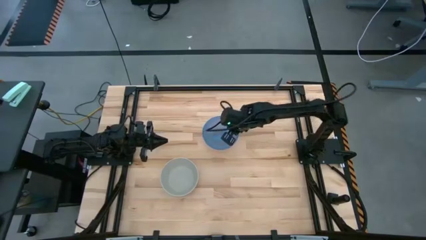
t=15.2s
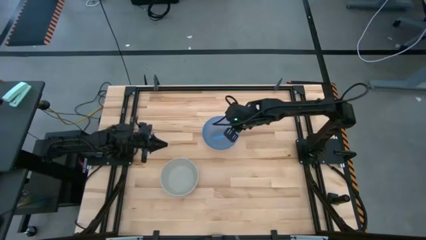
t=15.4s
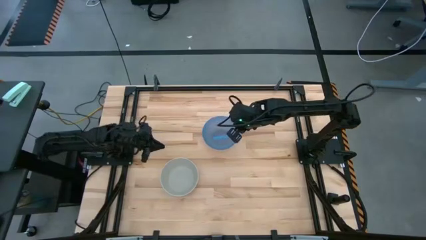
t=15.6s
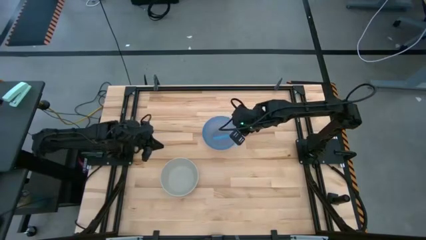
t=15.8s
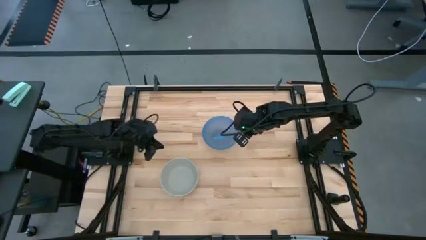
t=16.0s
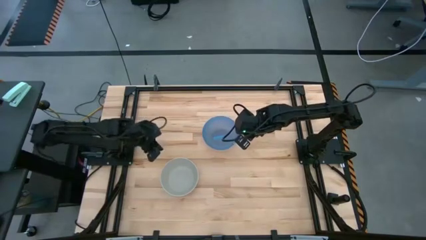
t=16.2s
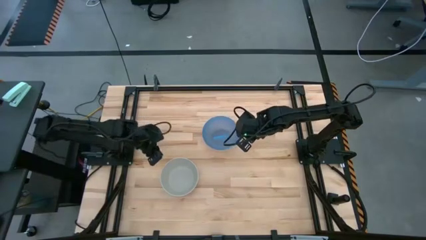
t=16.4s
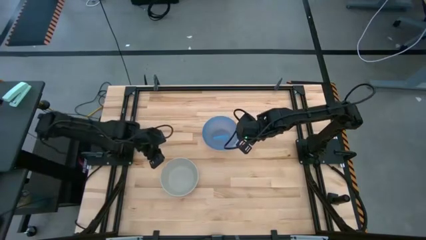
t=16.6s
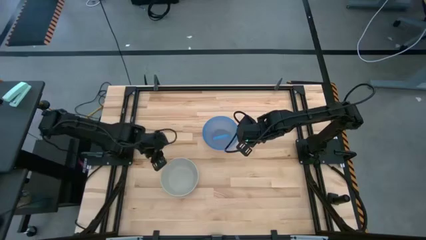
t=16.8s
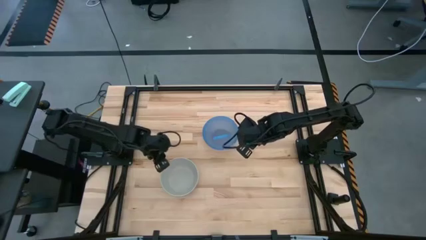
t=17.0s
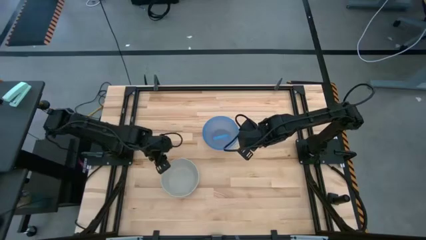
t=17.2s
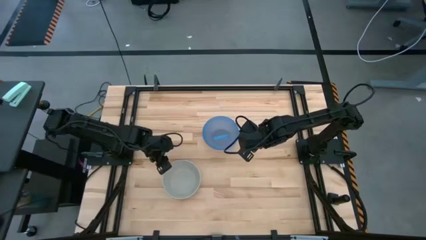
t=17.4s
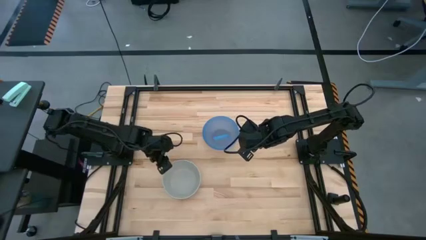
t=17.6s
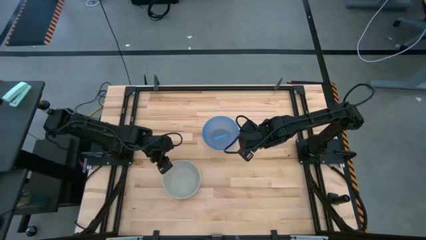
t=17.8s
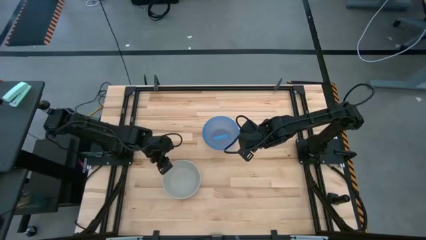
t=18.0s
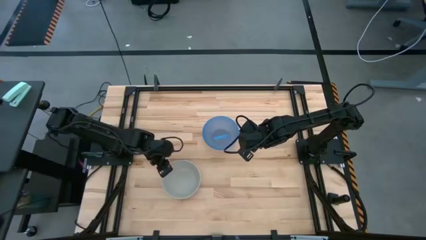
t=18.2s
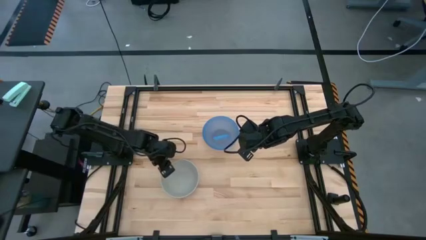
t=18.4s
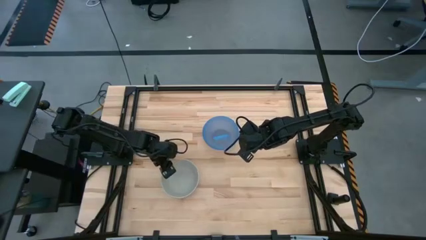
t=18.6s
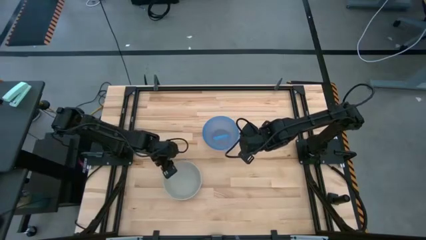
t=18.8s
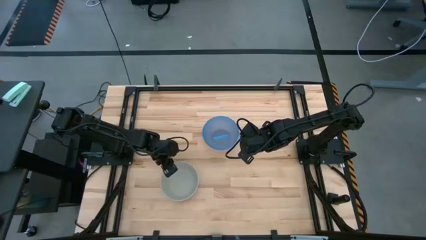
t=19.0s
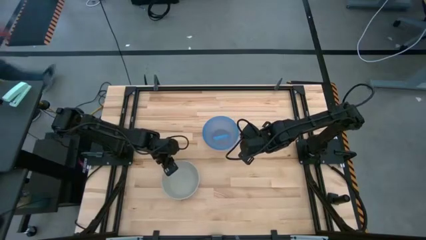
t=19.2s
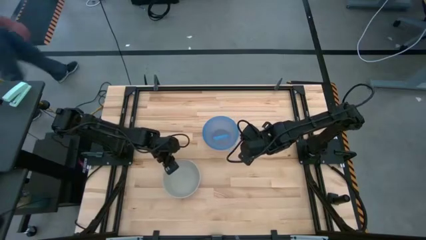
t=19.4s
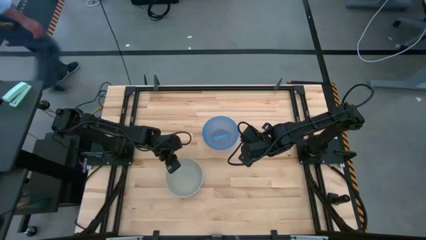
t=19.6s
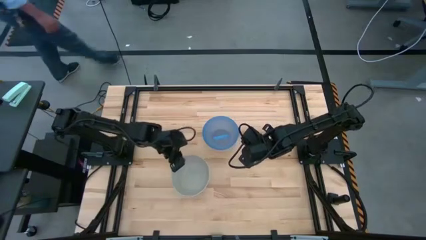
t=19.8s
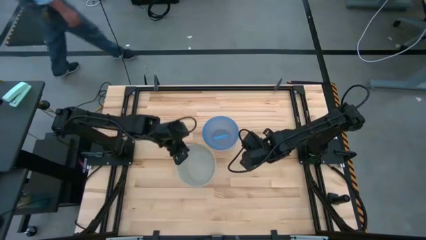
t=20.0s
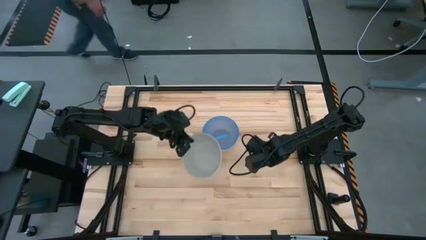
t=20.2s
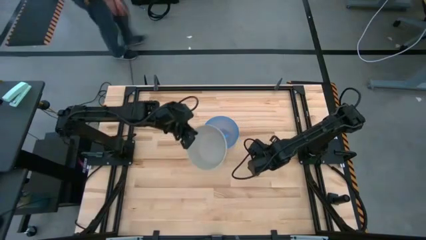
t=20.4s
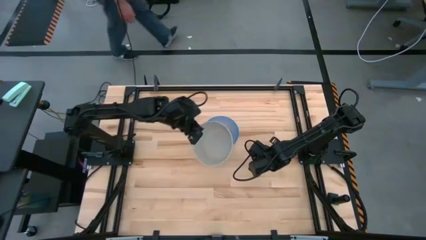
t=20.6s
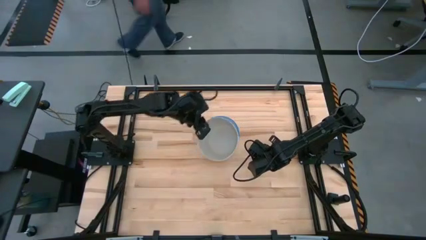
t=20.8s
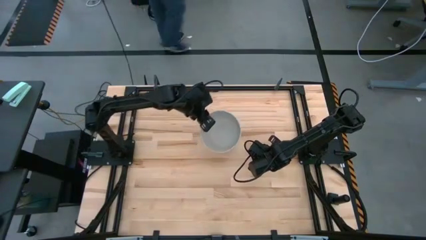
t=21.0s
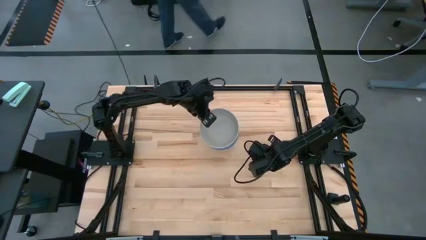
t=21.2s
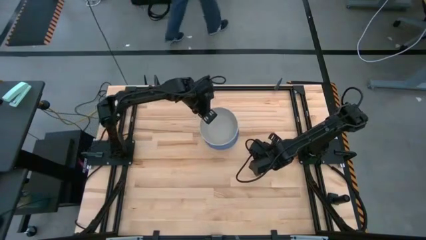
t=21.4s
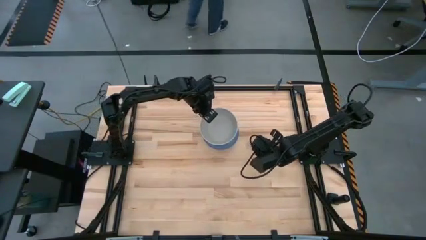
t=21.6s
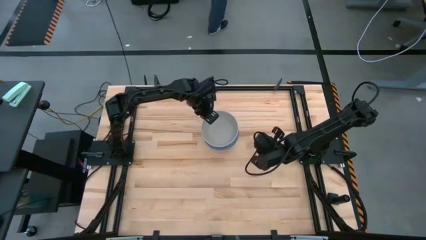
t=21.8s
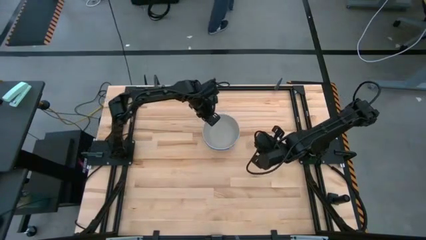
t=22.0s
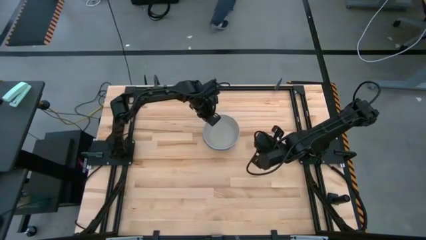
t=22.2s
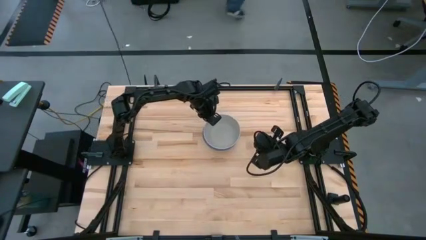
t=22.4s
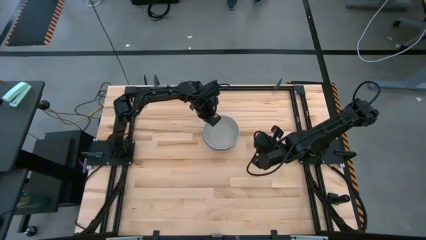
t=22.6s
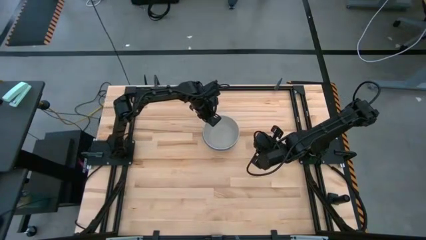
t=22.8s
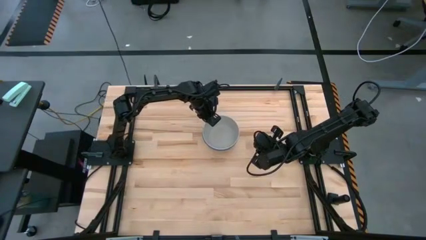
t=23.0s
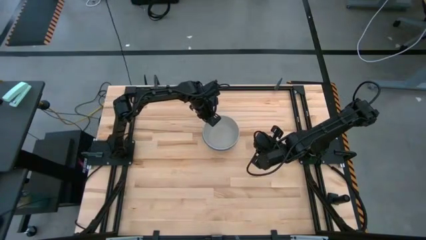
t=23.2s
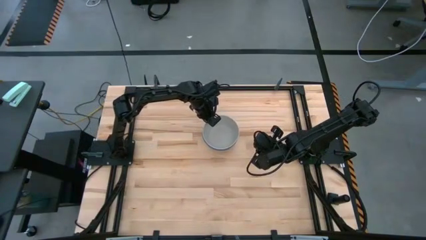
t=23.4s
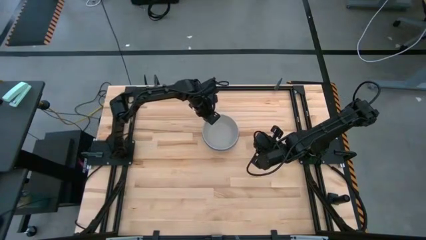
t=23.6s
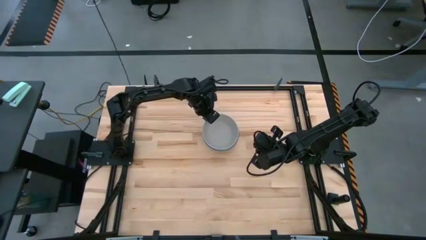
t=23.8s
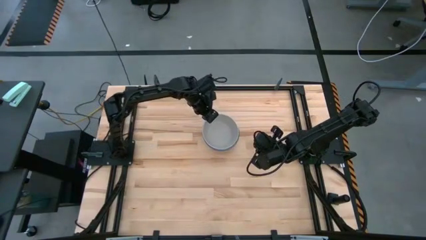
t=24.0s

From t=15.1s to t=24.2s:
Task: Nest bowls inside each other
Stack the gray bowl on the blue bowl

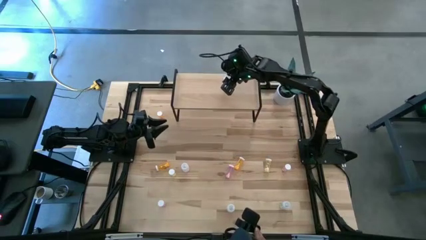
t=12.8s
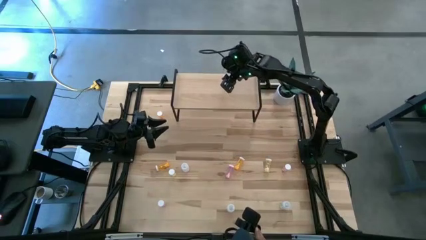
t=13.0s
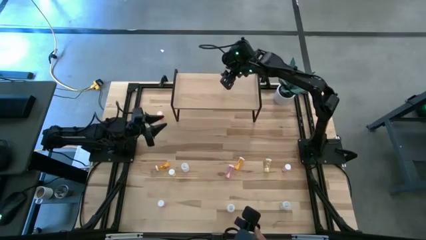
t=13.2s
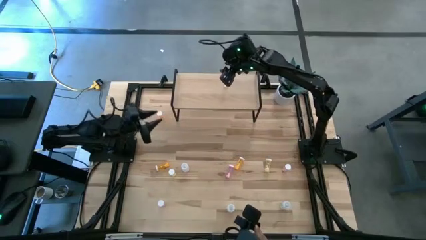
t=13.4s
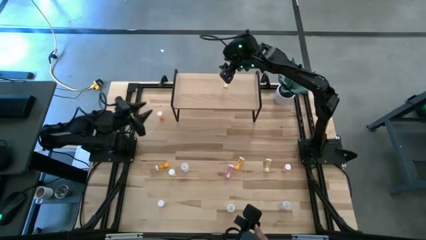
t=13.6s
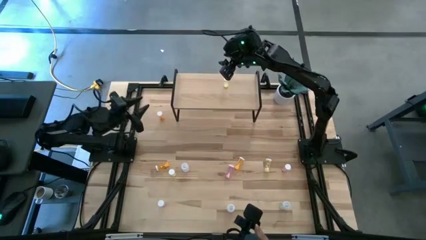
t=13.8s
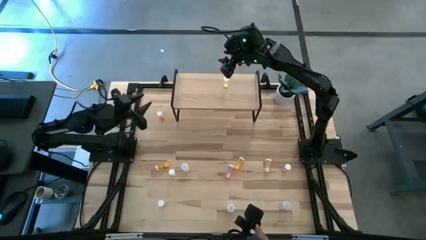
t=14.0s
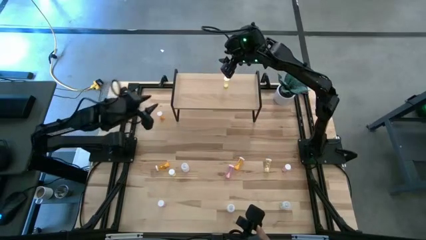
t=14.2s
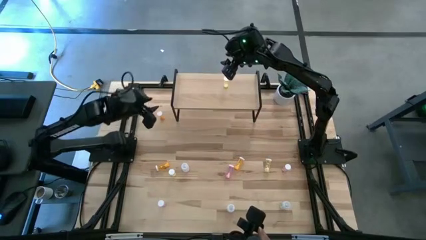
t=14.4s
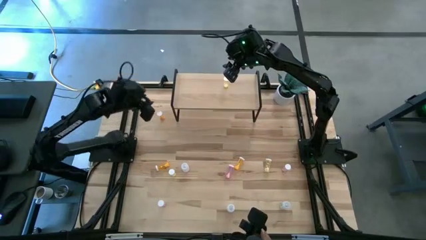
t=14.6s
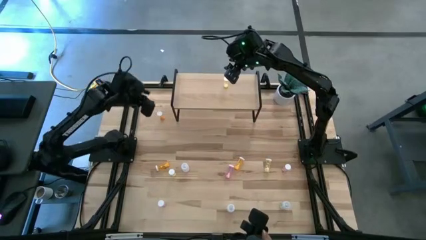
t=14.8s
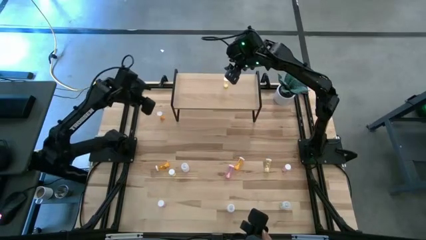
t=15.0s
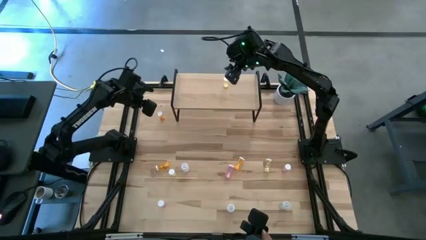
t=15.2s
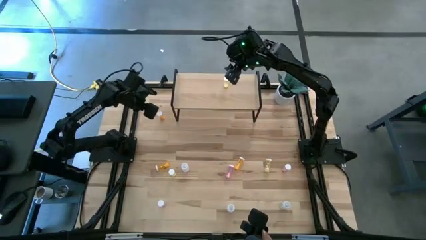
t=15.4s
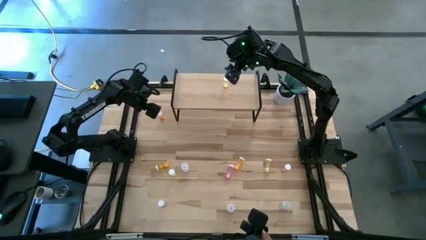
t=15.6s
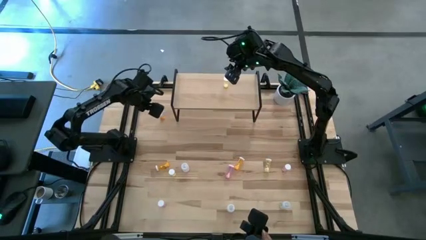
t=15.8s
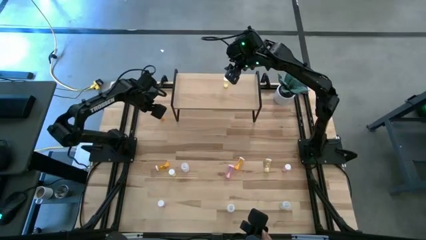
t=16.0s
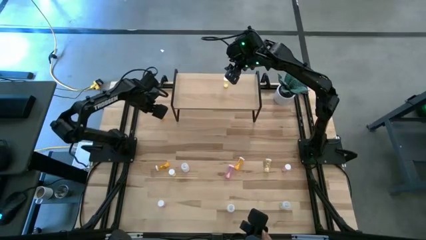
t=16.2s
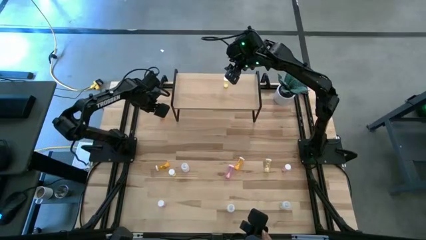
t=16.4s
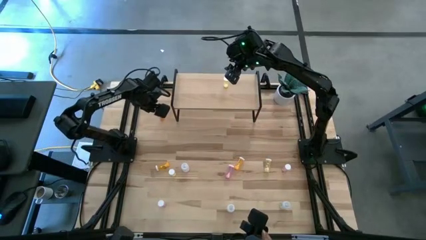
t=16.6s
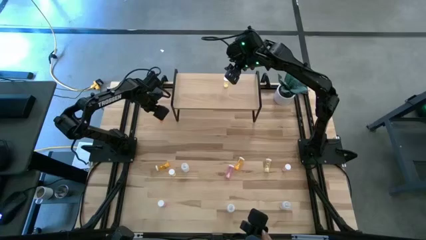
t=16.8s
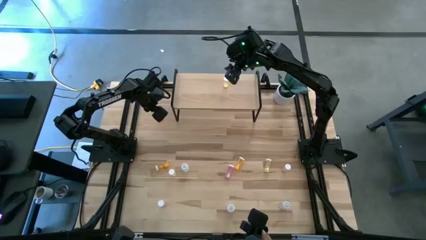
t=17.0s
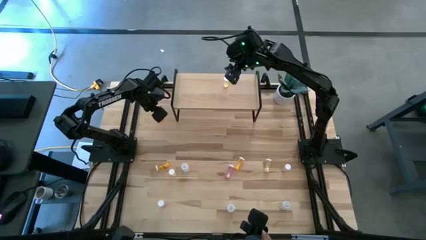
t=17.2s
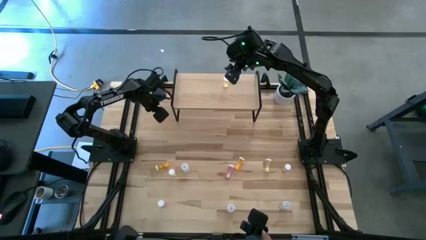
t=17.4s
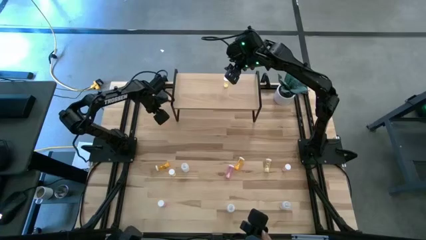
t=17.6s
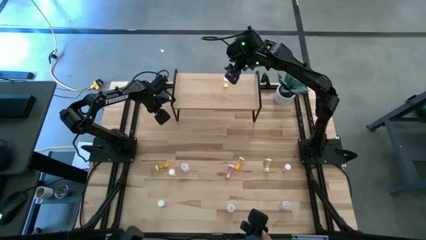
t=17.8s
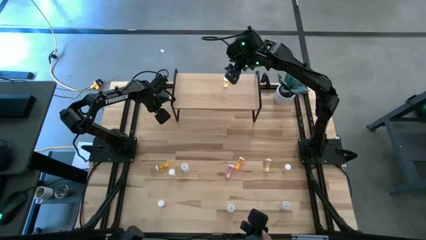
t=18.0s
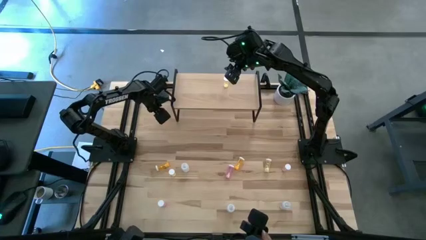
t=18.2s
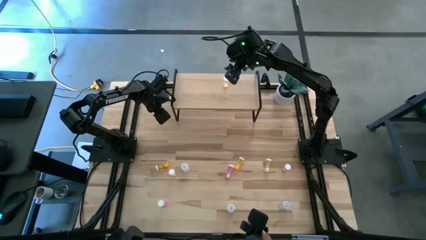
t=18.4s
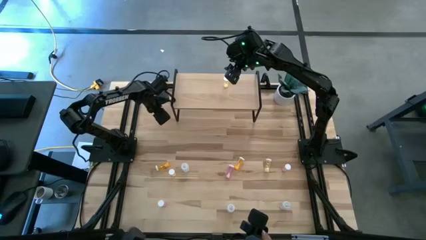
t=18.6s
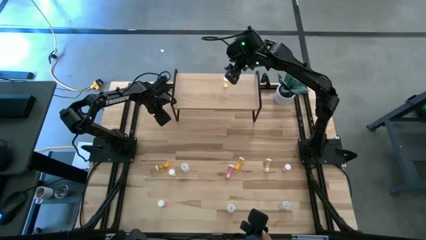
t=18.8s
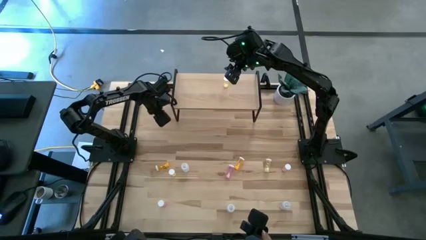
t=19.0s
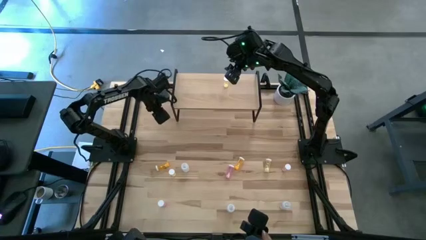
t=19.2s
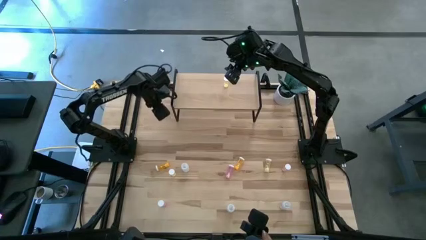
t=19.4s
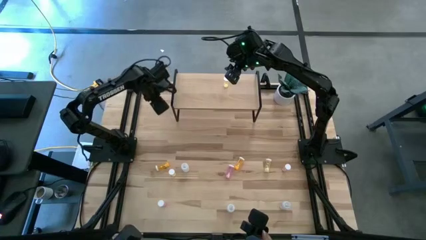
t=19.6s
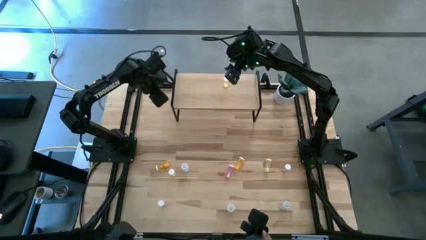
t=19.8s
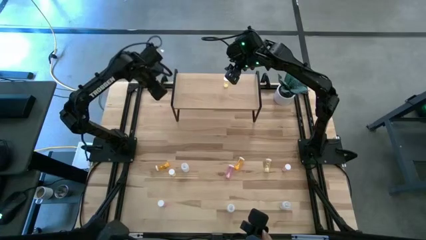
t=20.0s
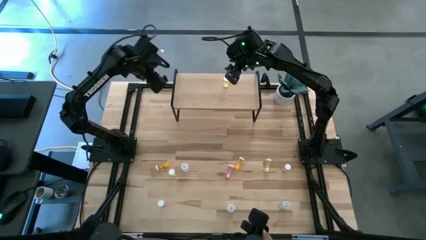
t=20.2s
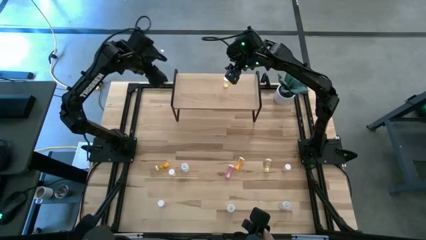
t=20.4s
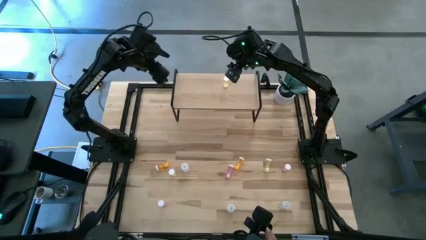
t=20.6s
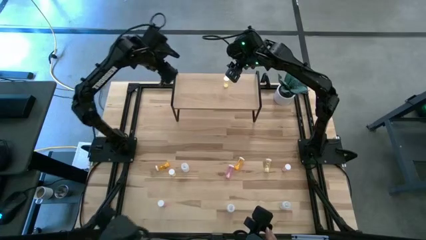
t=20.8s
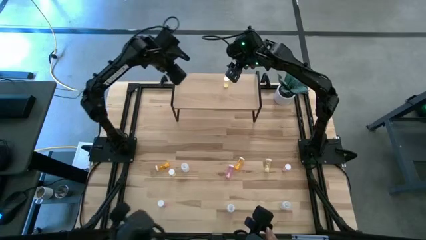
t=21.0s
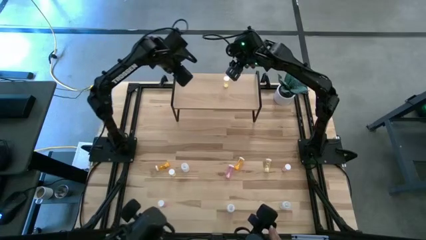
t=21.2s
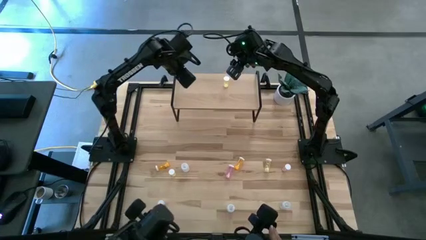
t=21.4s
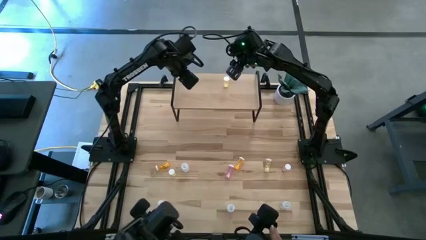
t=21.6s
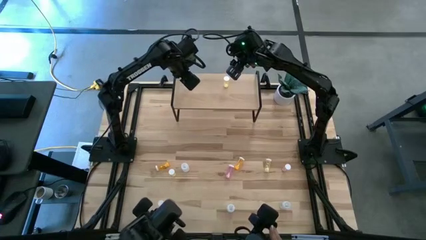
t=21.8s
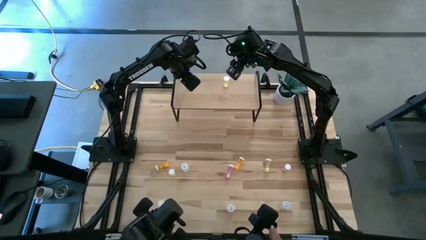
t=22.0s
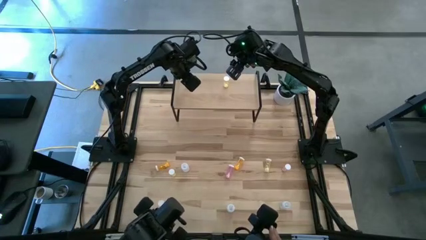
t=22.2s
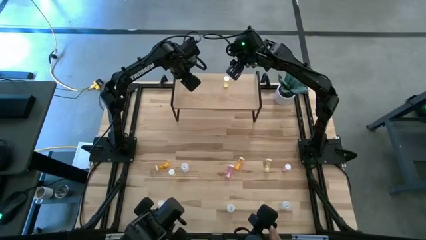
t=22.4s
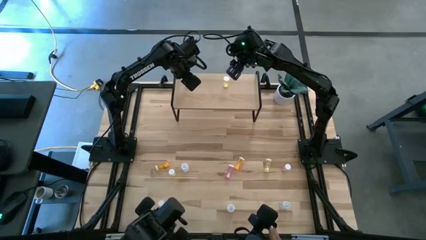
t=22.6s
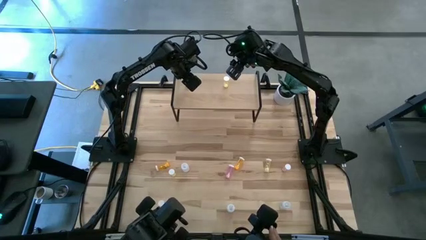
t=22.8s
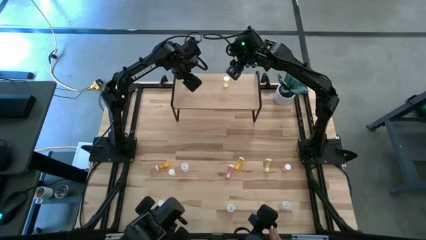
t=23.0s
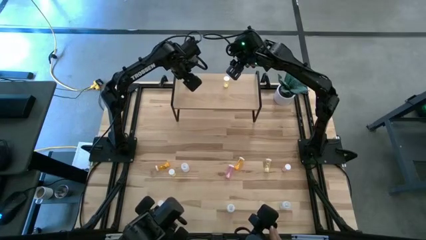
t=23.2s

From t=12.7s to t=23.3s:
Task: Pick and place medicine bottles onto shelf by color
Put the top left orange pill bottle on the shelf
